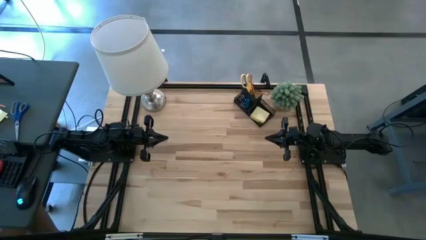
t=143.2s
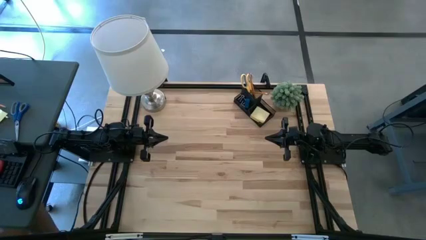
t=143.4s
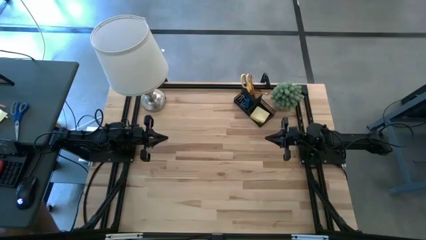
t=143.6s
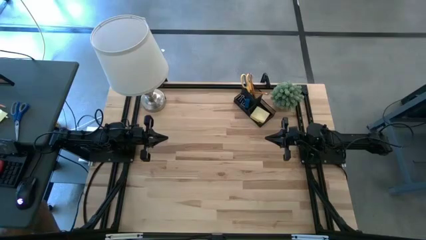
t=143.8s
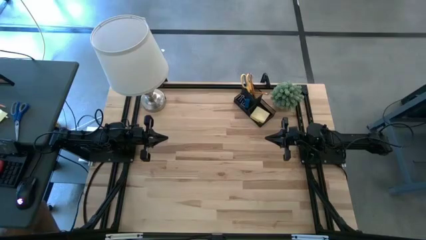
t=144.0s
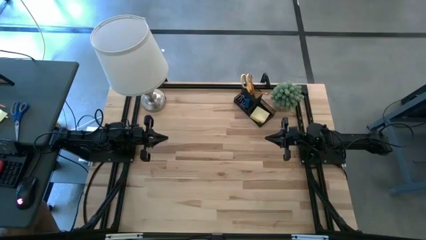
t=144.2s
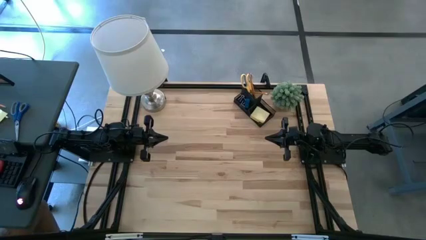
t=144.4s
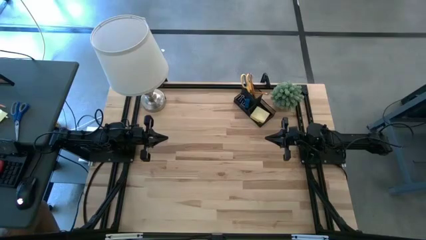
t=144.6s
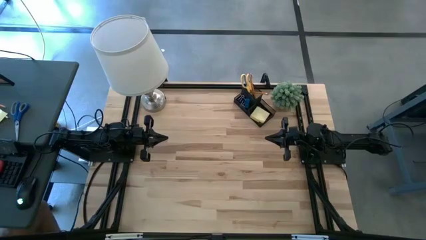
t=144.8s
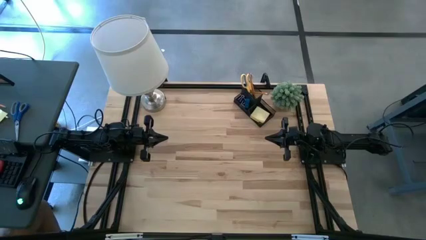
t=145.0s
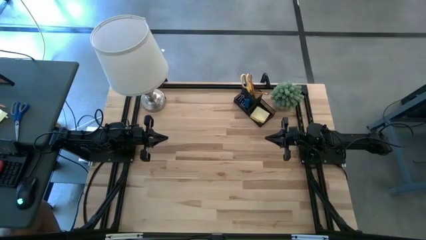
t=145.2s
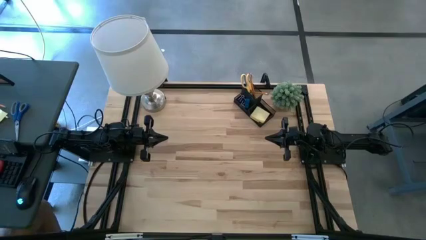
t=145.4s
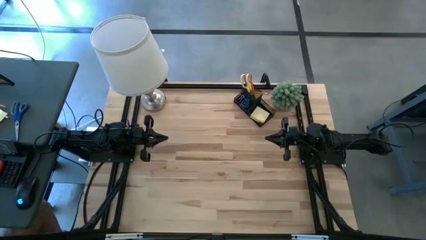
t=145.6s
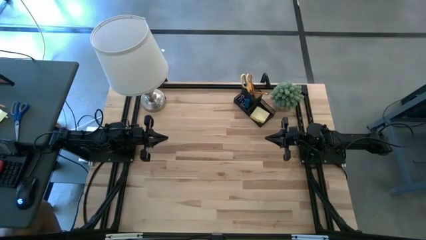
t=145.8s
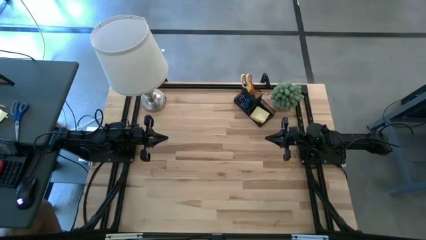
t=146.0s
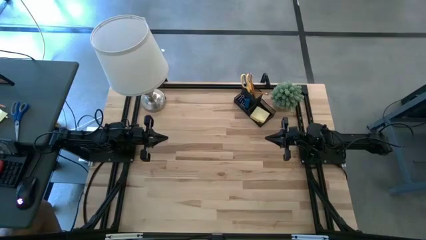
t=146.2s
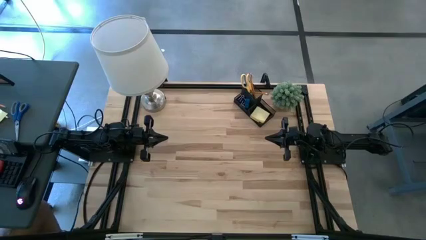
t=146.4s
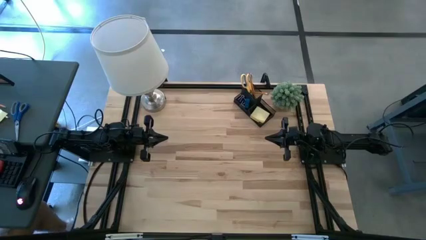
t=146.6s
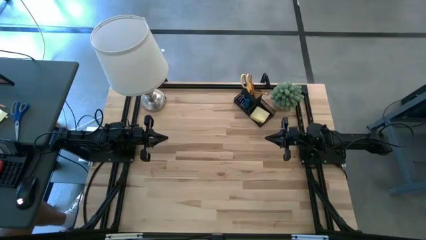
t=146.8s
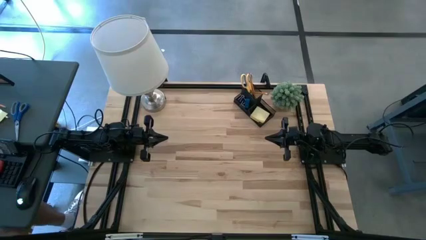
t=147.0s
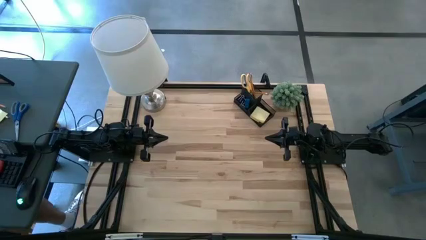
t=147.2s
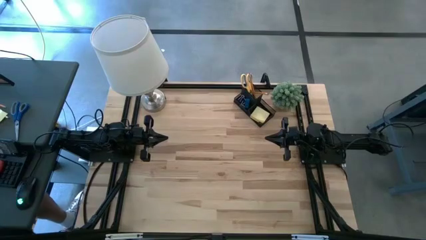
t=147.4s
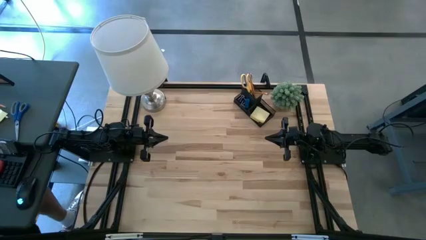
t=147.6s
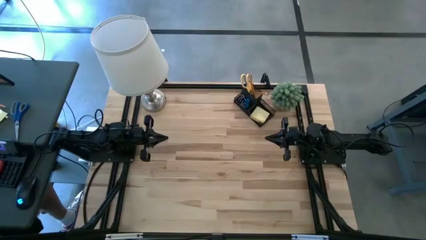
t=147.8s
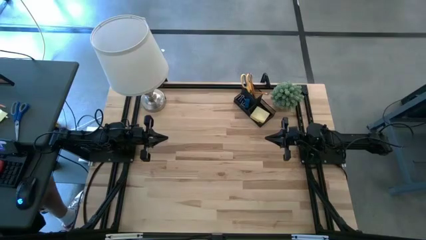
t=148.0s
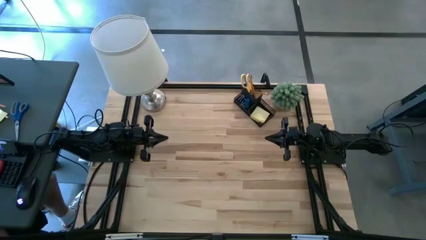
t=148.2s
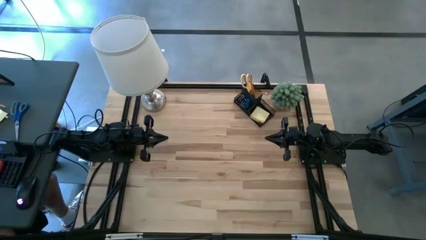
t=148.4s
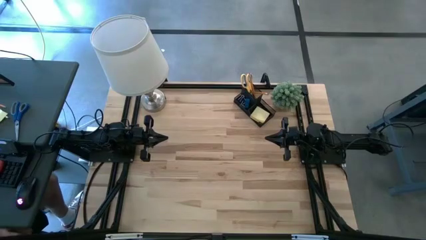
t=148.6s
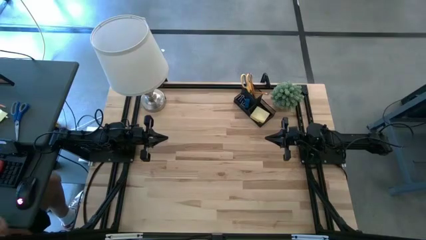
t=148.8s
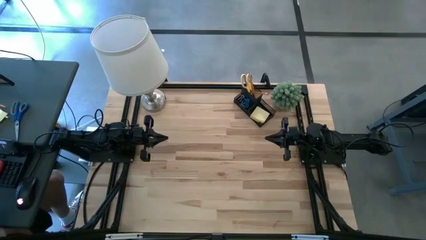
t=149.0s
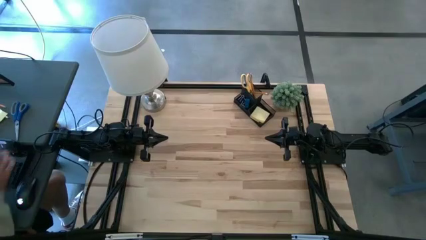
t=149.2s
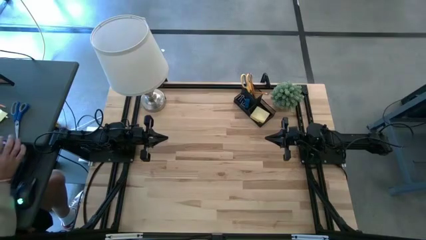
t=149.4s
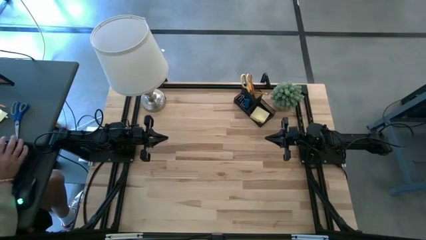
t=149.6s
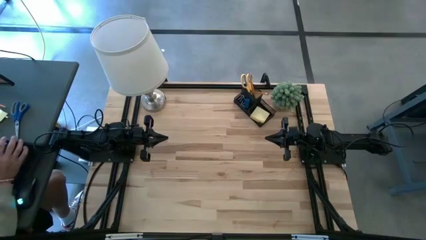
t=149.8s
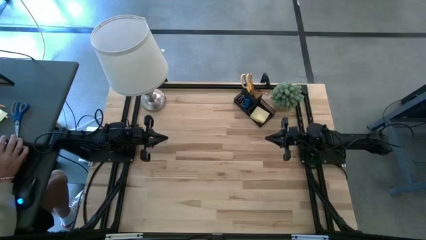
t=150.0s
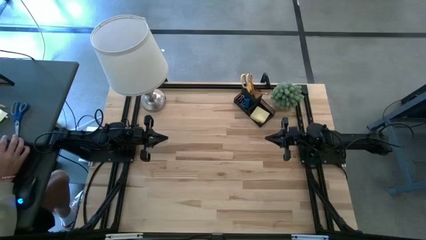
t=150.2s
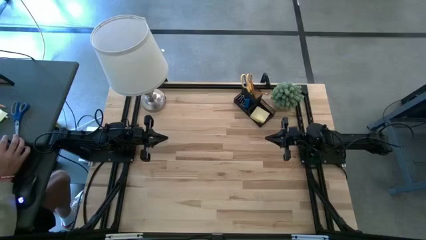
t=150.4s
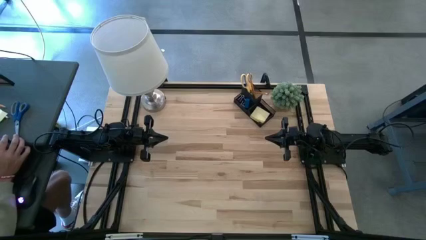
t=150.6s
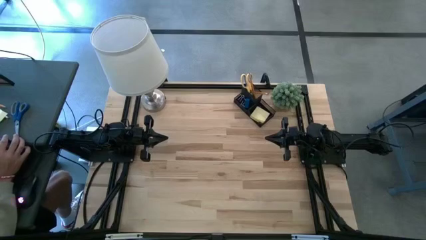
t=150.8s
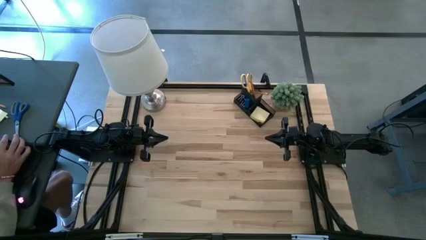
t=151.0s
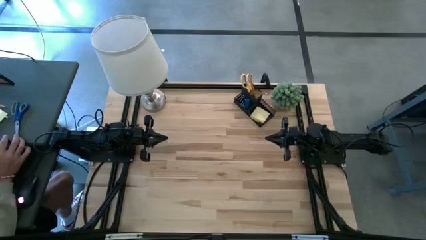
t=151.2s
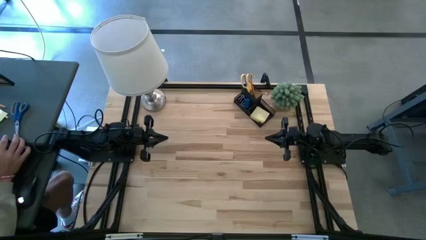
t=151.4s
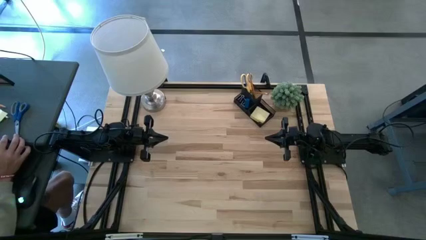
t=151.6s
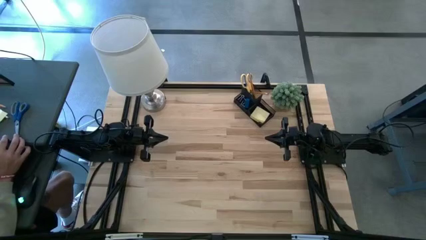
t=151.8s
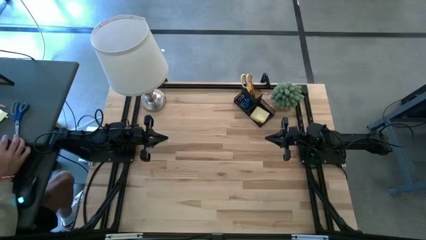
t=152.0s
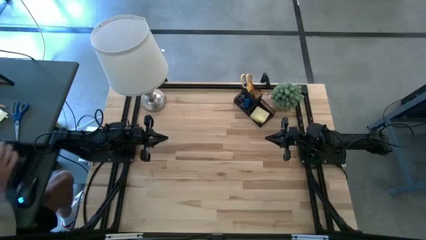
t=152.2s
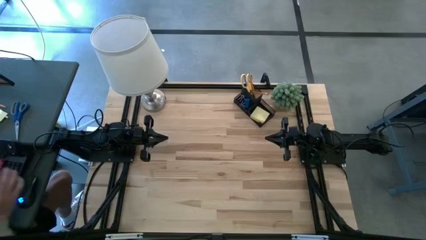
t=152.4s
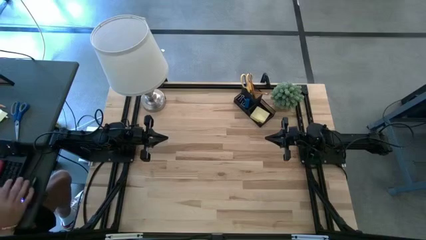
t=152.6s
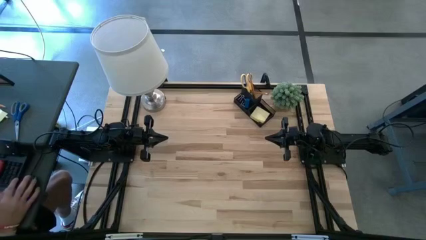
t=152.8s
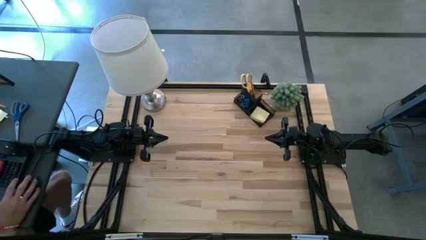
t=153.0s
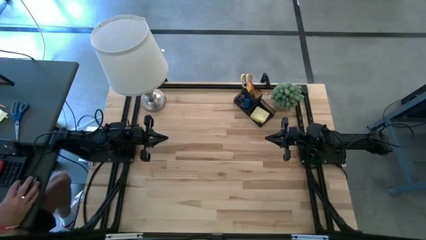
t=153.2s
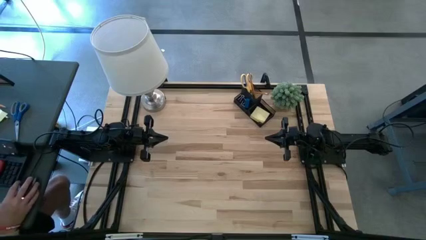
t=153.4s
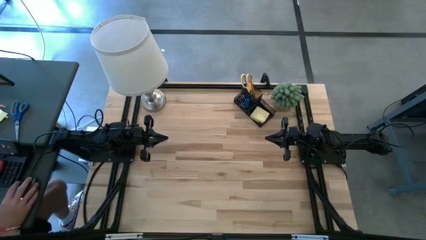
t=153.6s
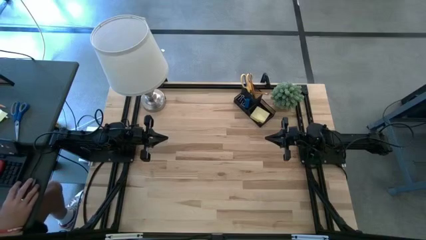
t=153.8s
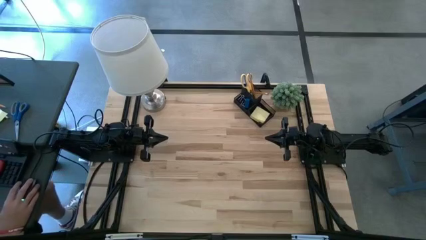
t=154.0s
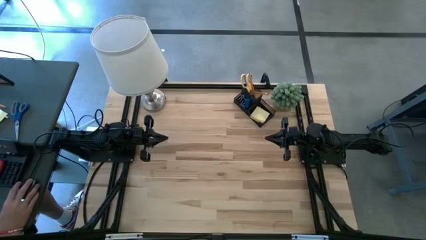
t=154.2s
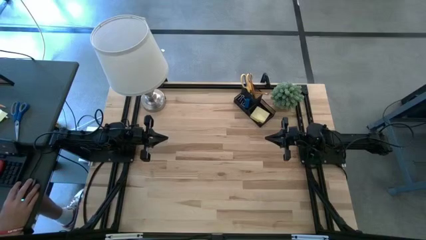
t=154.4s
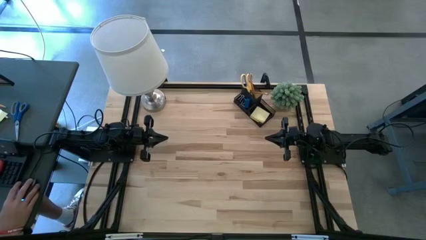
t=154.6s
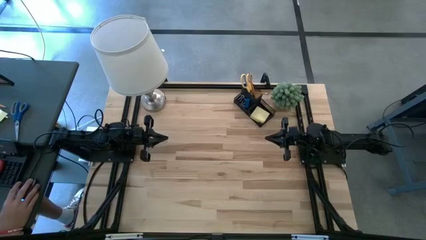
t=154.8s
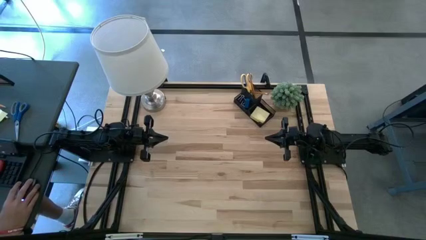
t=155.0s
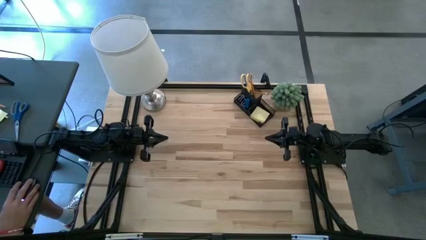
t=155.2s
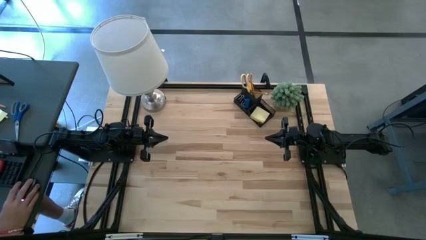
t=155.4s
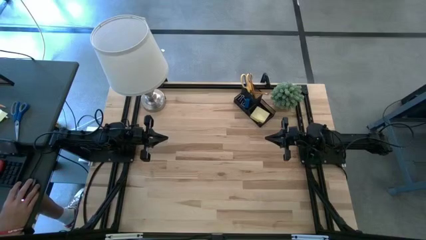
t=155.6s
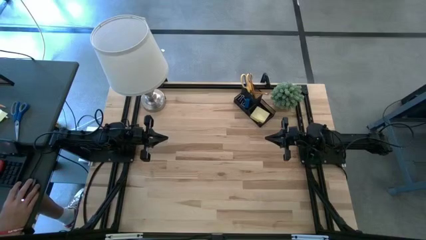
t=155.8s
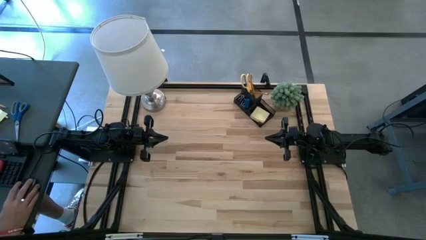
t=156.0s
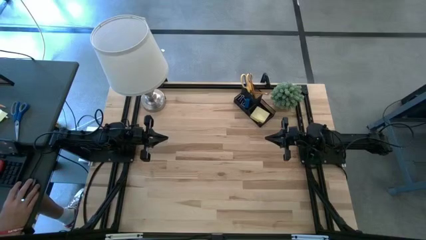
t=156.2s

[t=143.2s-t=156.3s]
Task: Pick and place office supplies into organizer
Return to Home Position
